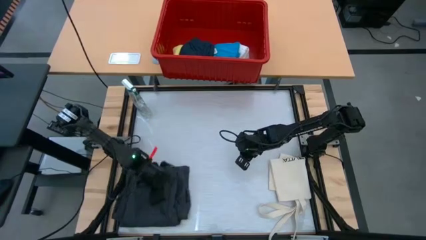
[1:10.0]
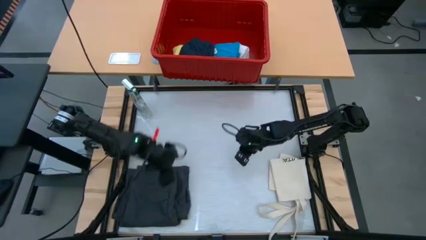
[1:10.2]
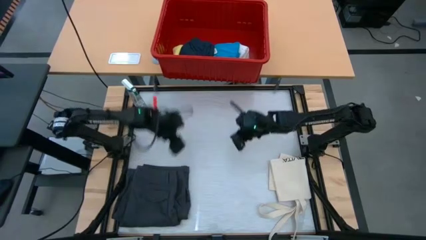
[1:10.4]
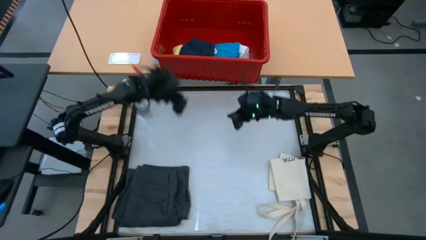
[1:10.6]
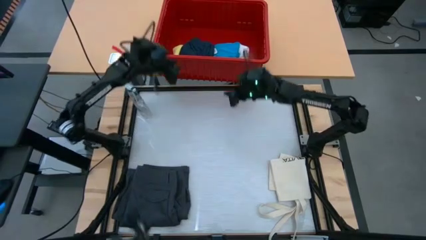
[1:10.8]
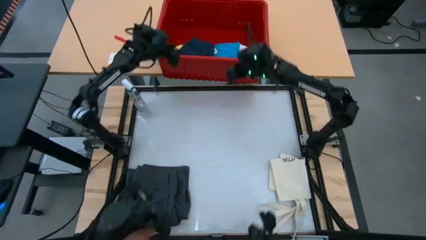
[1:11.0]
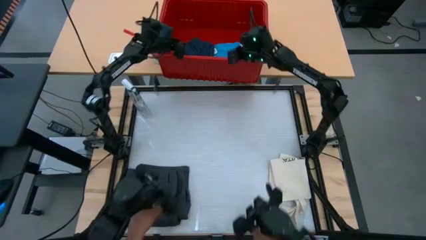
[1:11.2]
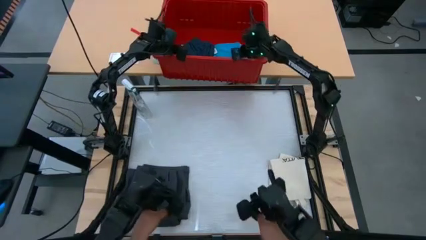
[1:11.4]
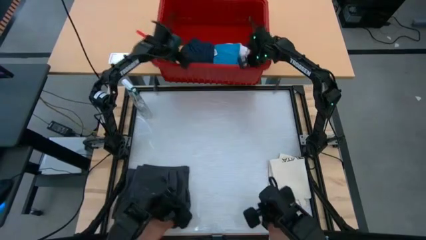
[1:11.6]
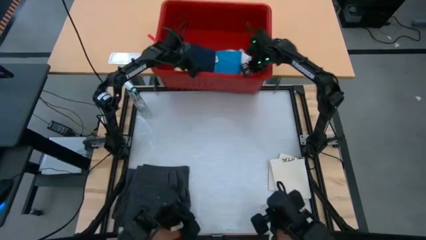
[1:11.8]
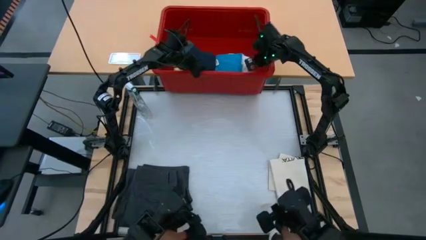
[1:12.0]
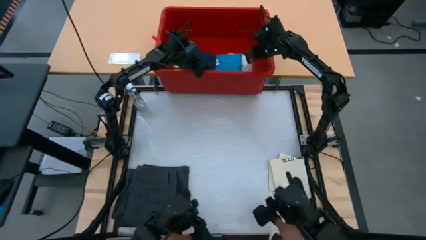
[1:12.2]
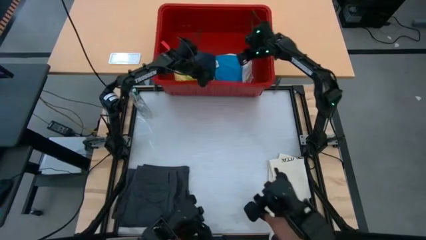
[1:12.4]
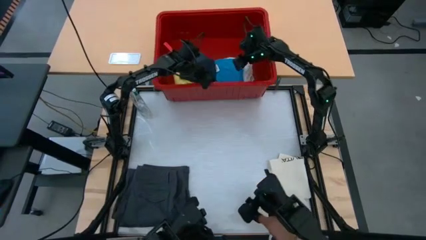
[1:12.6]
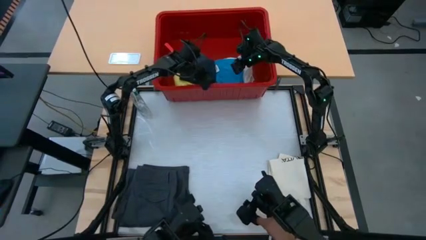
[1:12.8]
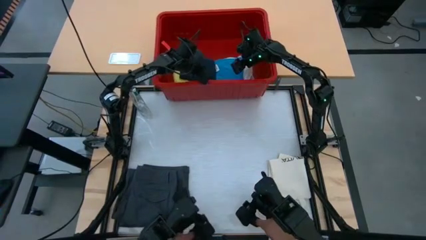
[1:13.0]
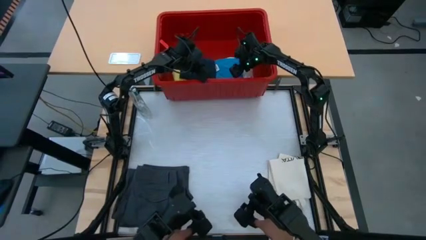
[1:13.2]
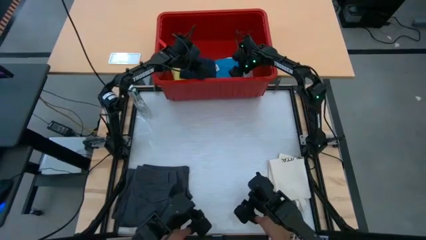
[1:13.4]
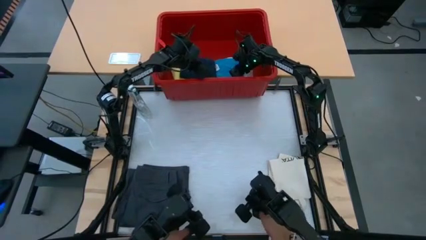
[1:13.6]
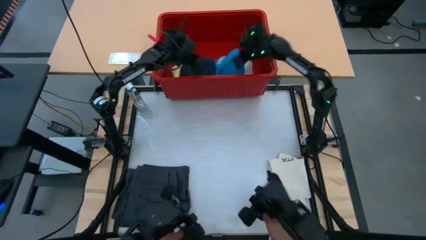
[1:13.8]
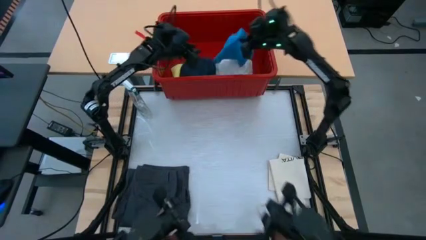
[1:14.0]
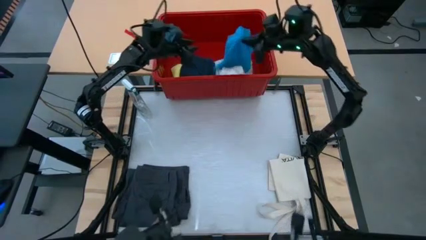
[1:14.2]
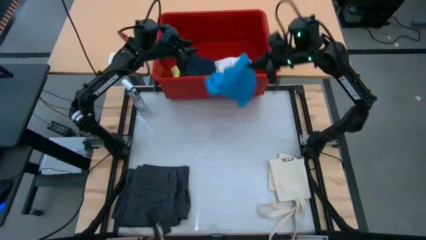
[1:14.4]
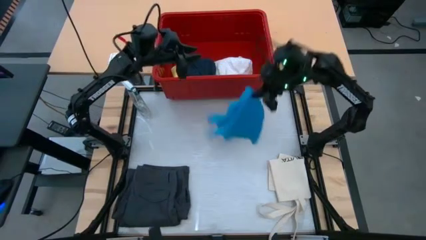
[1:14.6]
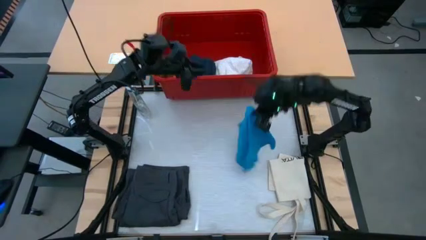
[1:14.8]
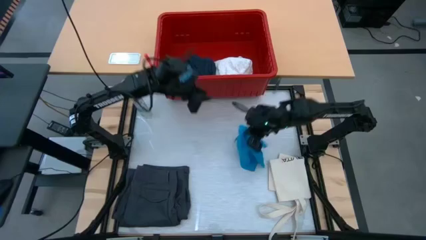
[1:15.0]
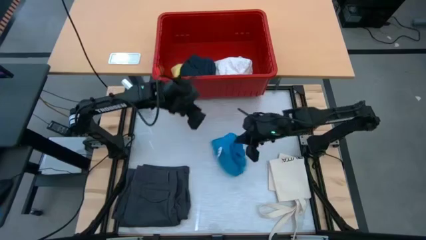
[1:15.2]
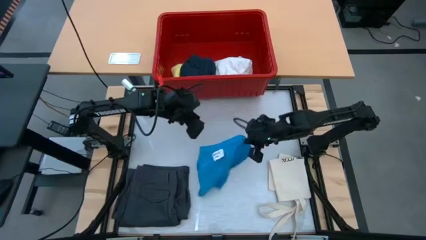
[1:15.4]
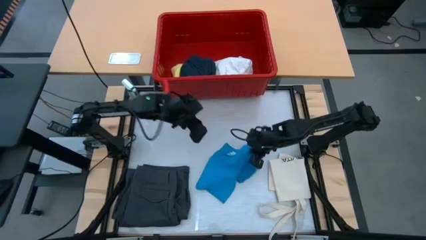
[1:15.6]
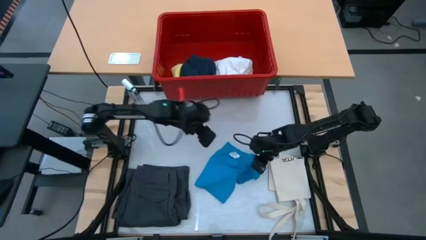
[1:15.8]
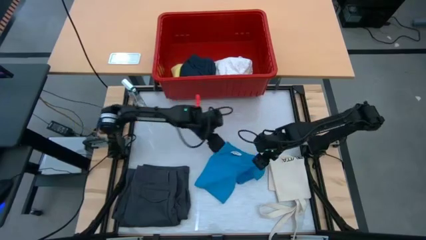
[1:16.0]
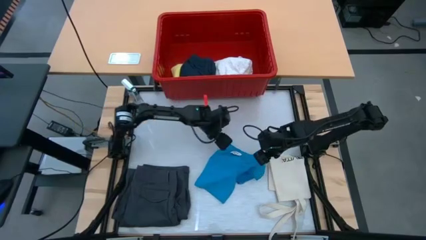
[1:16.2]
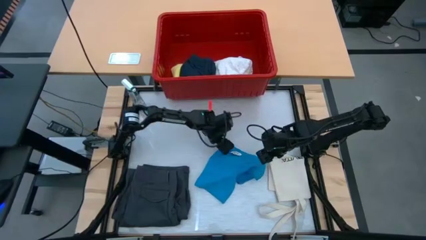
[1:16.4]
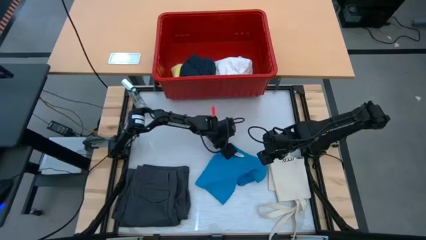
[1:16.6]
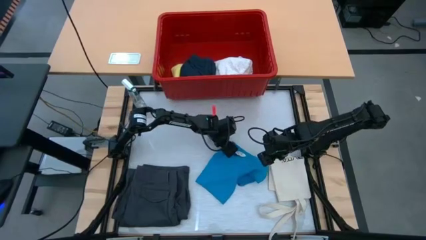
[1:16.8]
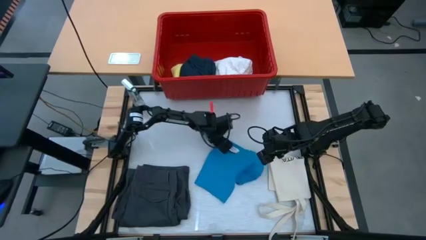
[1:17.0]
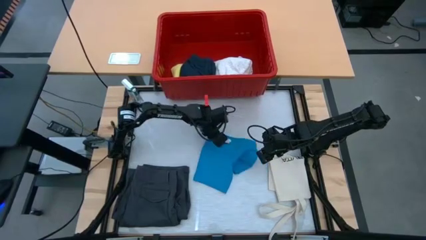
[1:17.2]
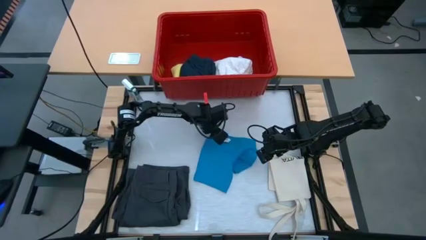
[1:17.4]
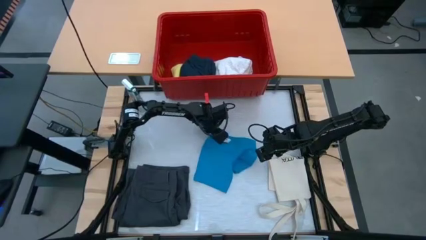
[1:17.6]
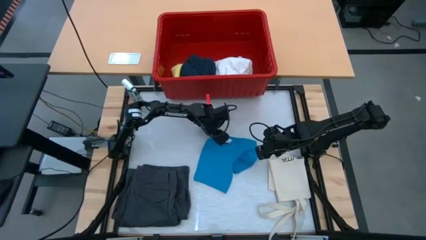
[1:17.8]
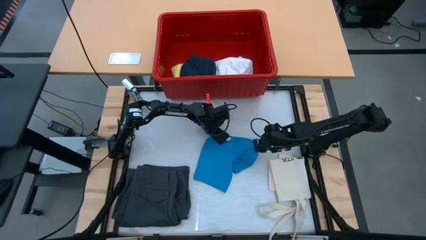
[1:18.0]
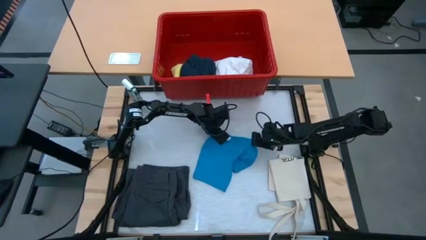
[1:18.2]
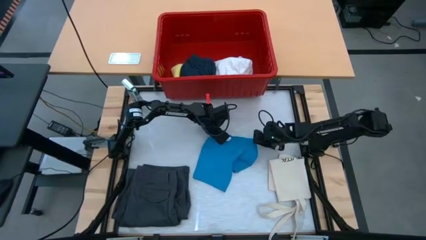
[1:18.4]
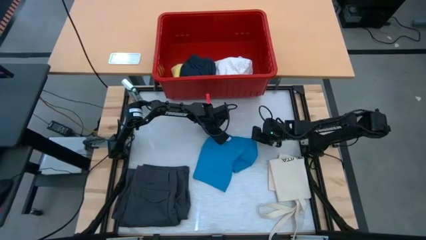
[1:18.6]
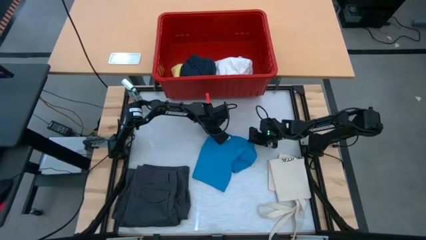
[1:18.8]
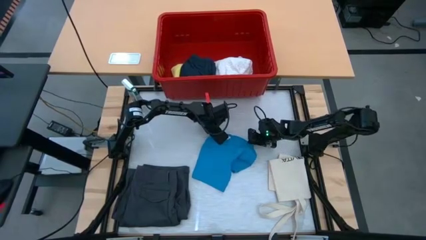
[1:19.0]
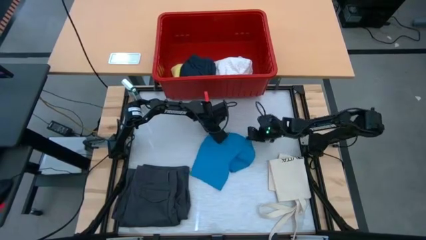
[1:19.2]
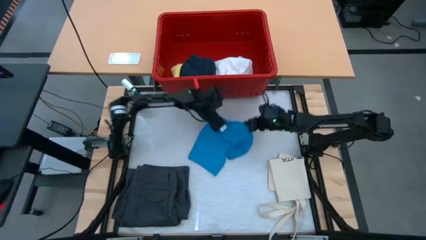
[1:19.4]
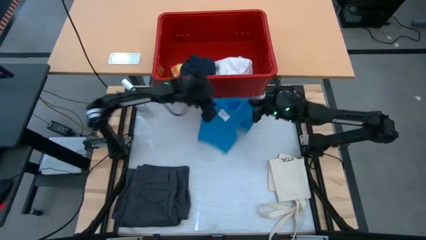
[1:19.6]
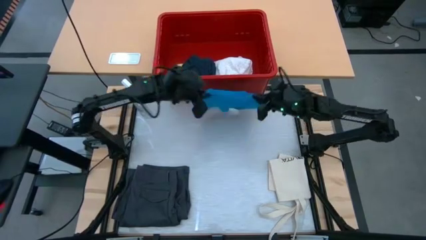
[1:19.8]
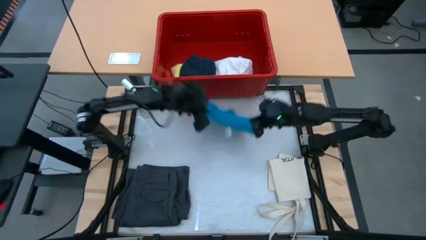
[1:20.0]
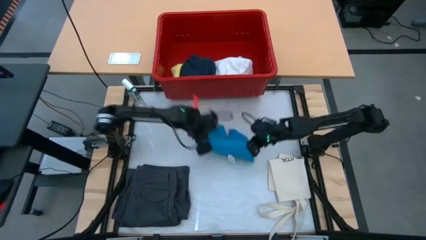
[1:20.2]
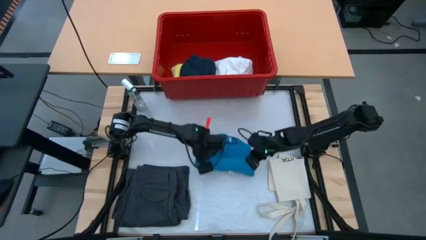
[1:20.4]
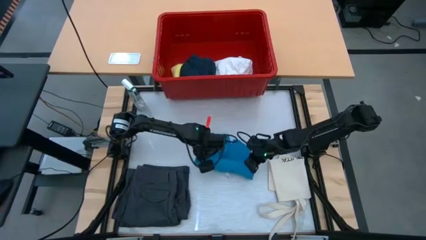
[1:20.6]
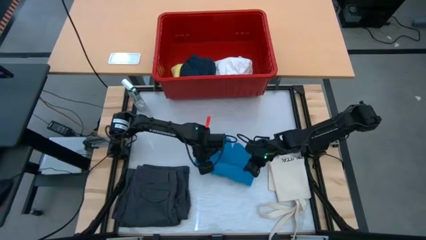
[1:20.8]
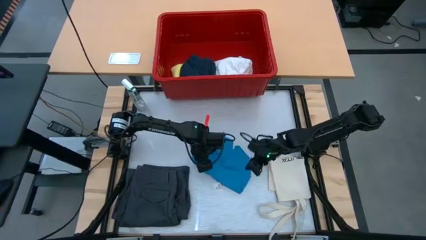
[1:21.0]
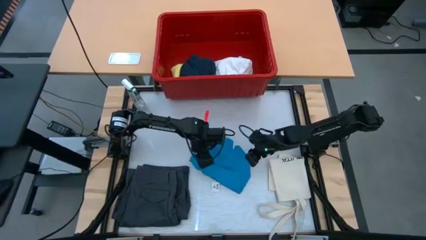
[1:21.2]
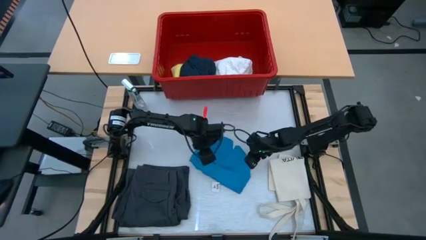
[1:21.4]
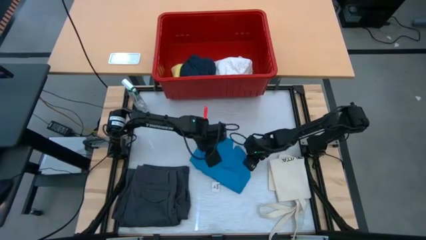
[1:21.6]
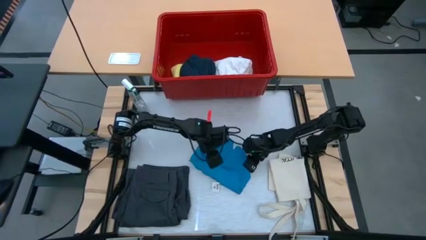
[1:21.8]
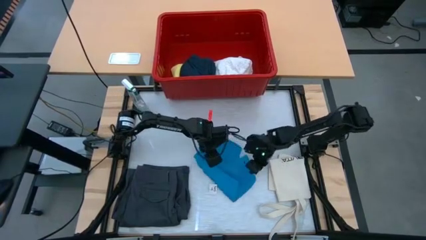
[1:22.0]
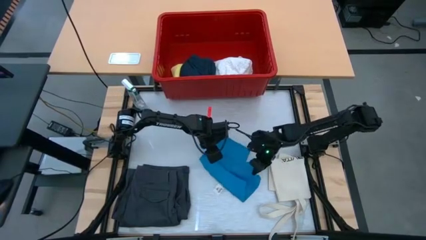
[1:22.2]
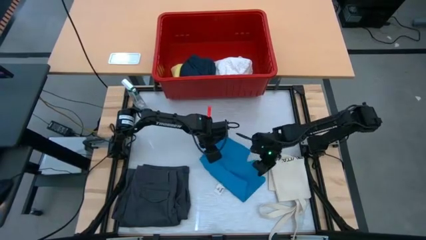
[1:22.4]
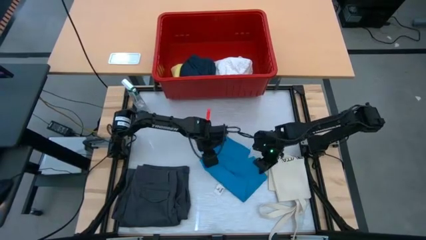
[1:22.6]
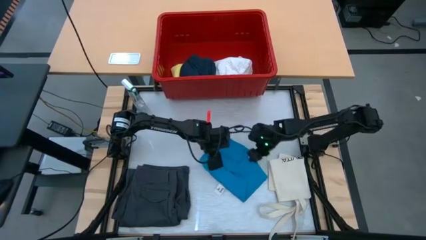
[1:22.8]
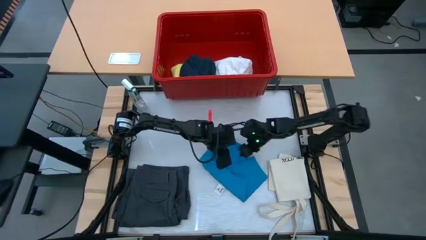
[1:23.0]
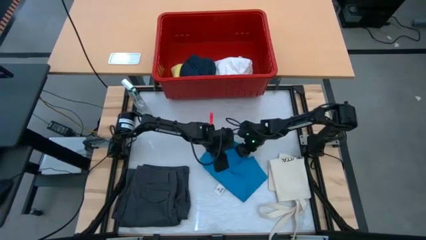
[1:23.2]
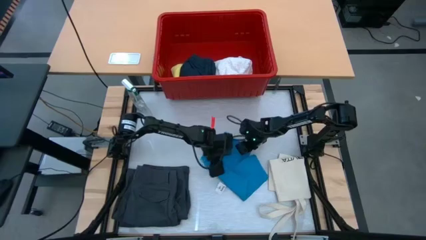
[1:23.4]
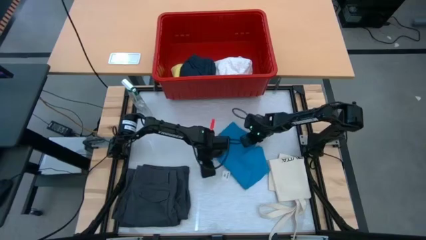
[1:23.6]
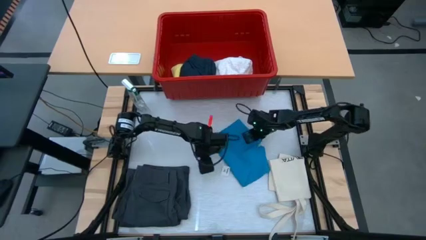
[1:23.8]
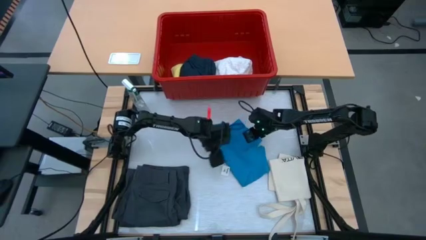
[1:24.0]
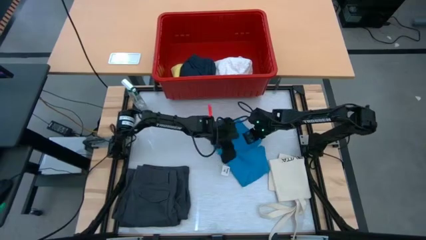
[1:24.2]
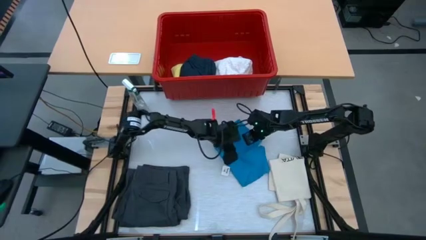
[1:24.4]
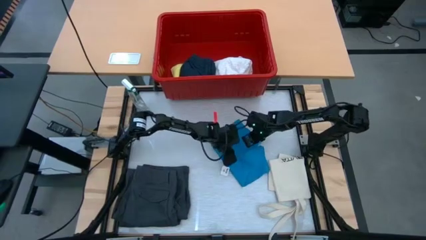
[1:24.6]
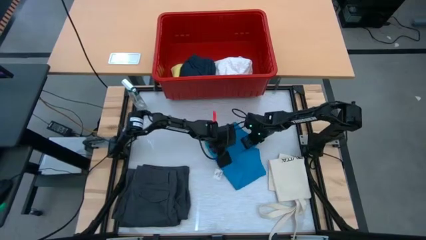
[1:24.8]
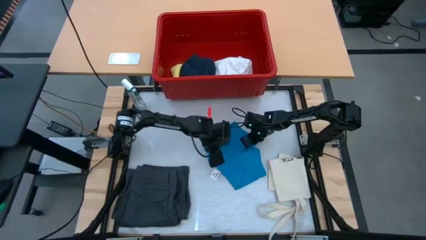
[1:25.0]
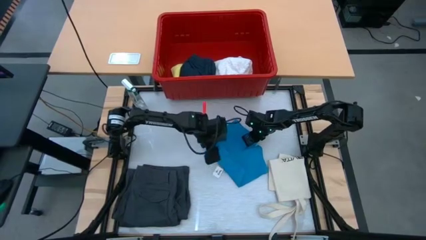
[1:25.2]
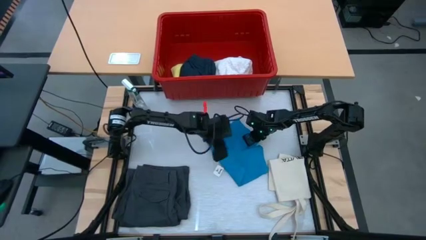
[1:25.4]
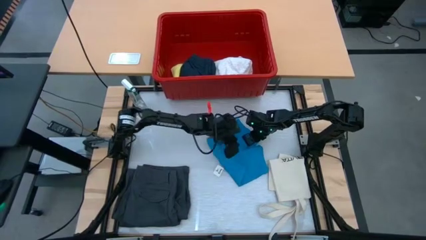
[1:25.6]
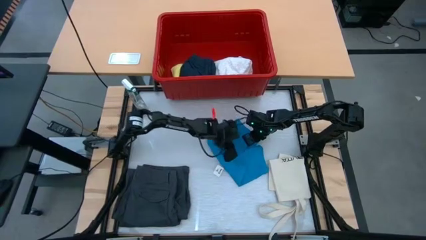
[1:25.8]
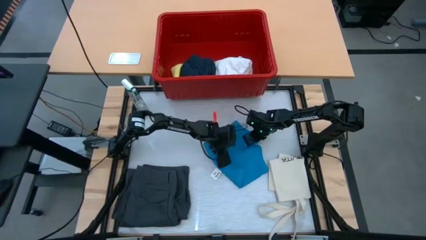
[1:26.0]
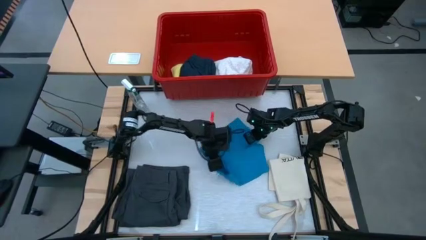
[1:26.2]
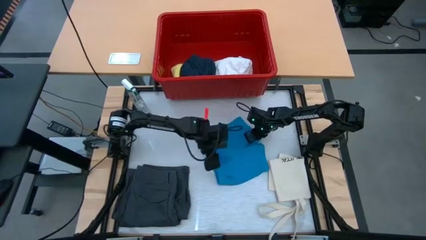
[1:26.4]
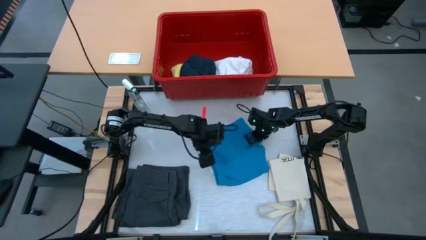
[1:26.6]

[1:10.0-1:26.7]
Task: Fold laundry
Fold the blue shorts
